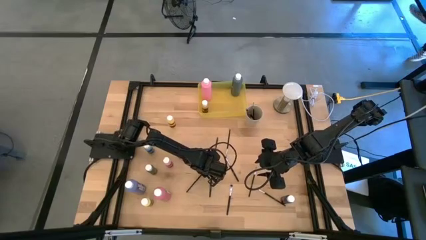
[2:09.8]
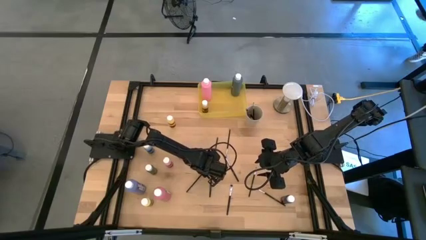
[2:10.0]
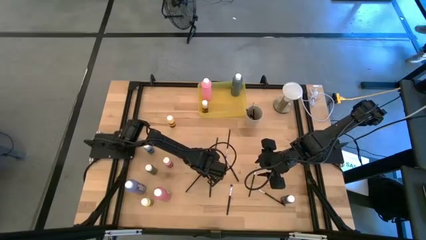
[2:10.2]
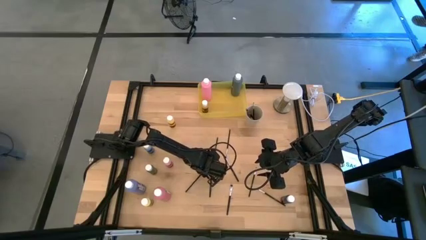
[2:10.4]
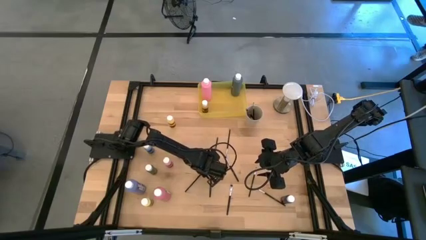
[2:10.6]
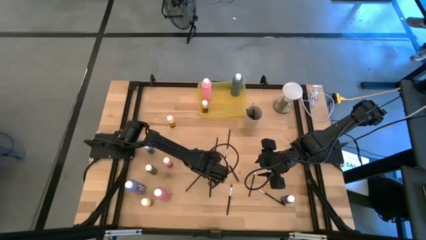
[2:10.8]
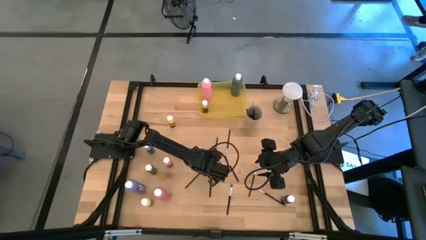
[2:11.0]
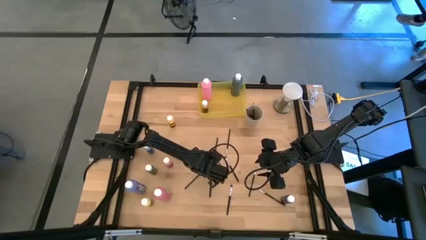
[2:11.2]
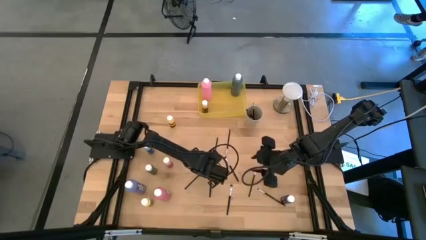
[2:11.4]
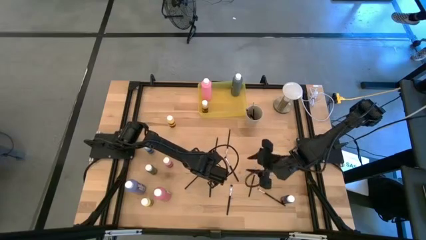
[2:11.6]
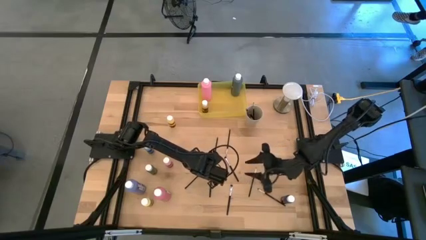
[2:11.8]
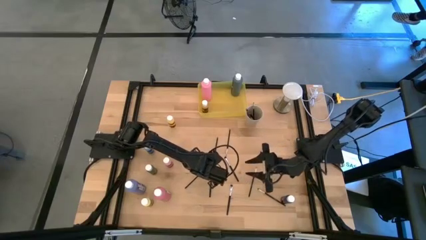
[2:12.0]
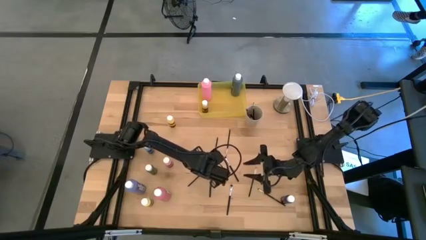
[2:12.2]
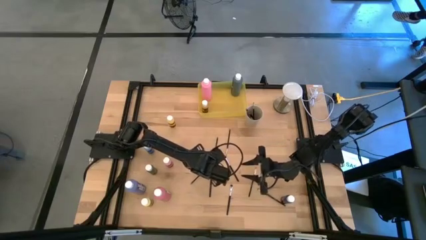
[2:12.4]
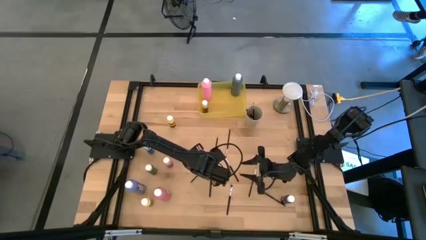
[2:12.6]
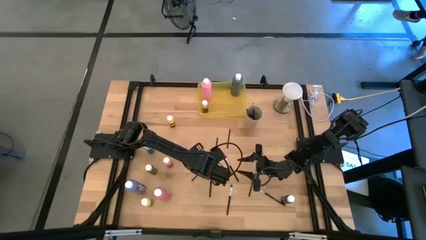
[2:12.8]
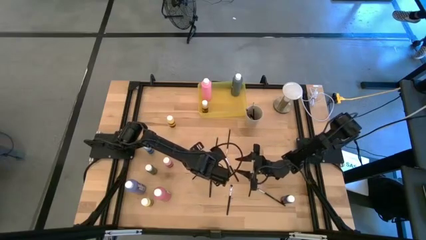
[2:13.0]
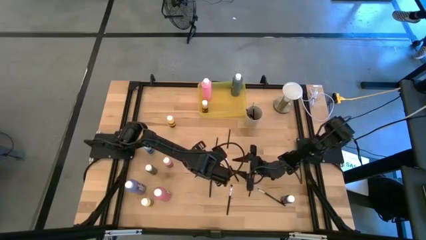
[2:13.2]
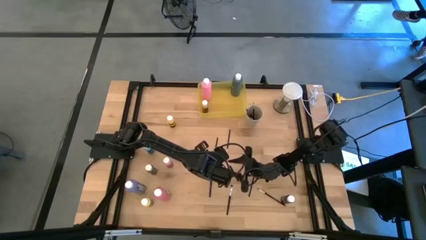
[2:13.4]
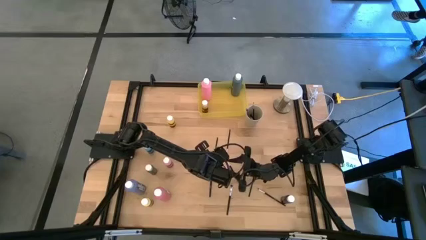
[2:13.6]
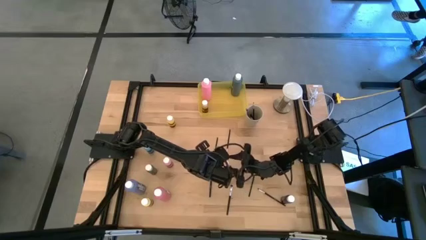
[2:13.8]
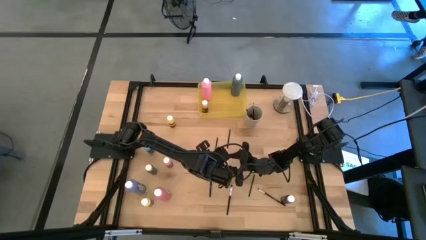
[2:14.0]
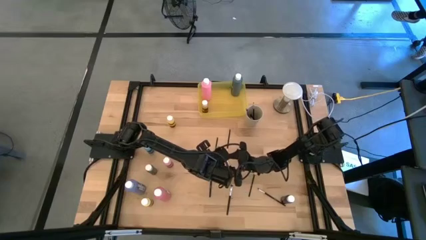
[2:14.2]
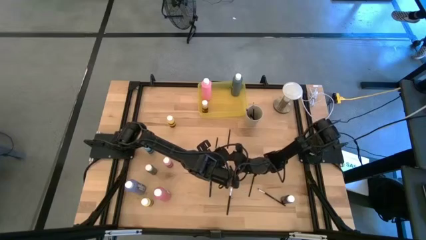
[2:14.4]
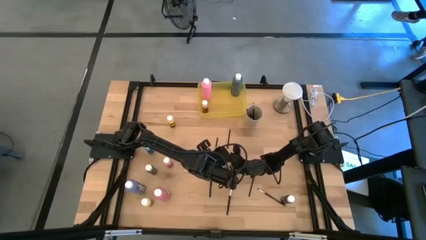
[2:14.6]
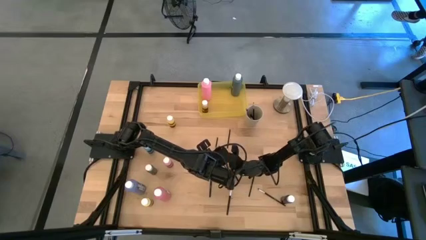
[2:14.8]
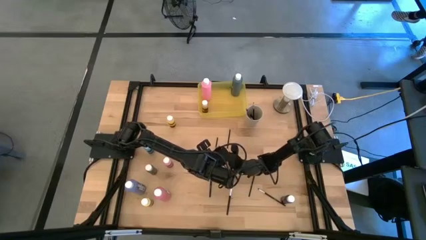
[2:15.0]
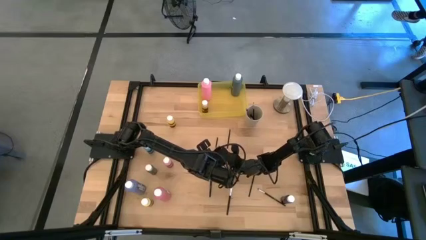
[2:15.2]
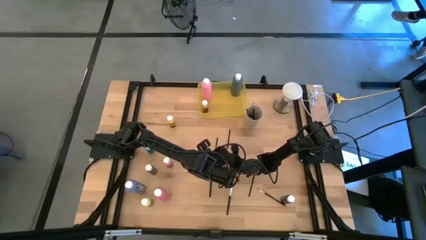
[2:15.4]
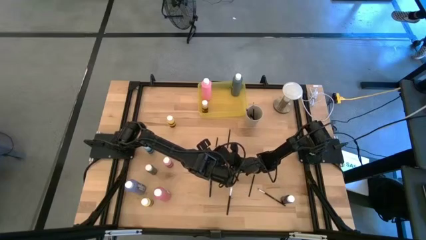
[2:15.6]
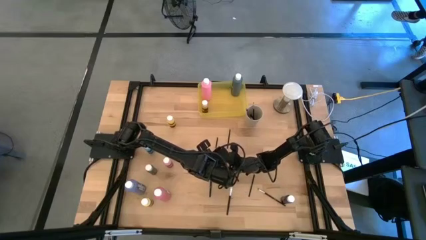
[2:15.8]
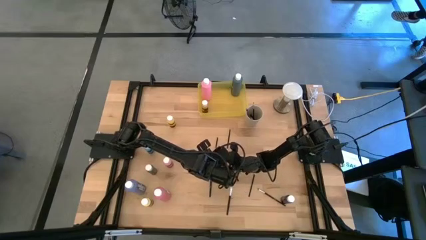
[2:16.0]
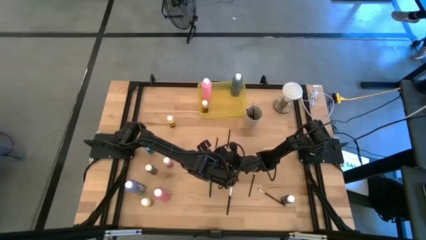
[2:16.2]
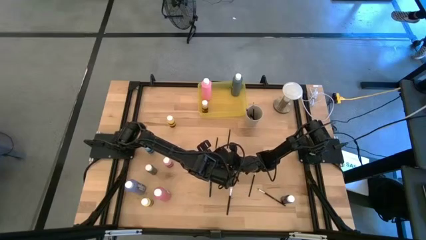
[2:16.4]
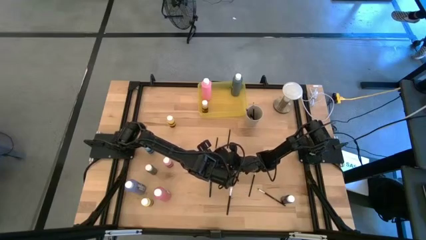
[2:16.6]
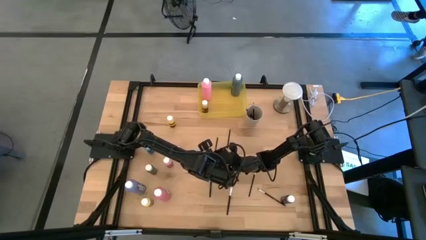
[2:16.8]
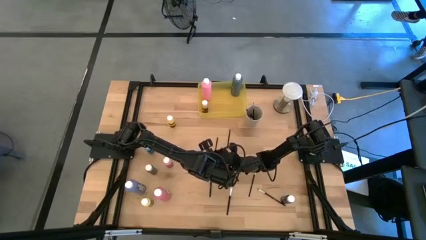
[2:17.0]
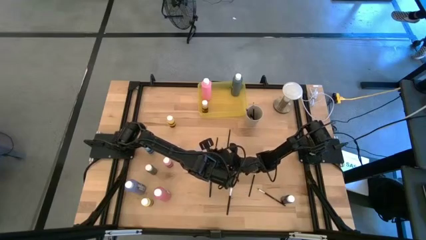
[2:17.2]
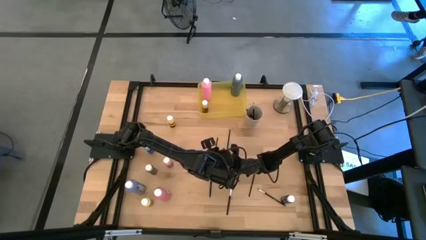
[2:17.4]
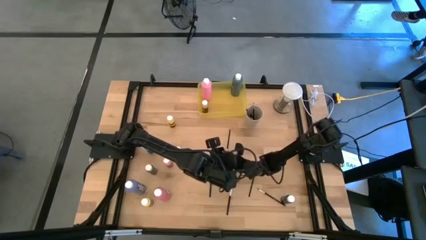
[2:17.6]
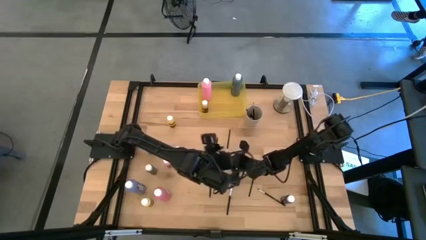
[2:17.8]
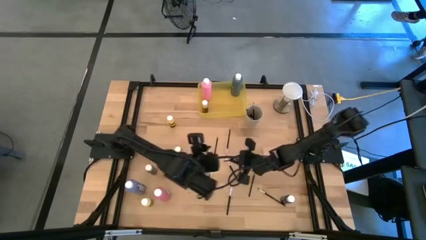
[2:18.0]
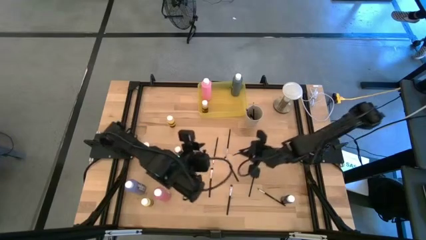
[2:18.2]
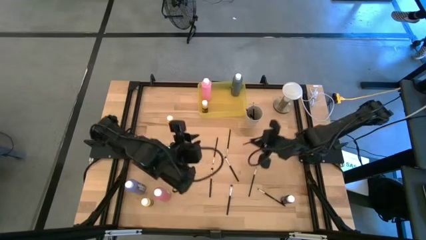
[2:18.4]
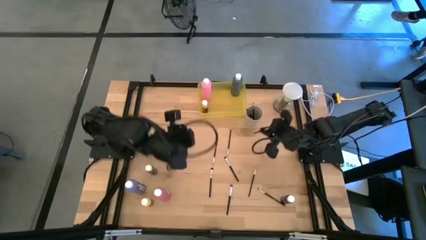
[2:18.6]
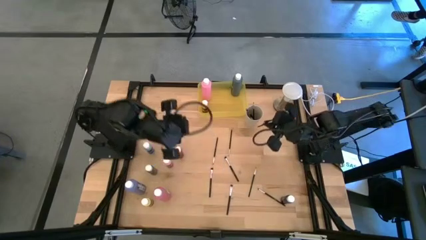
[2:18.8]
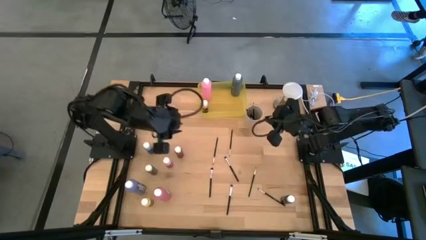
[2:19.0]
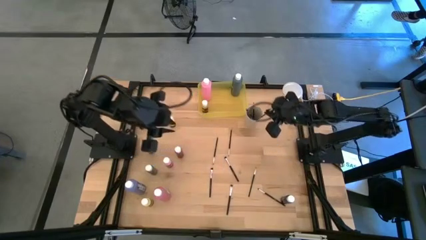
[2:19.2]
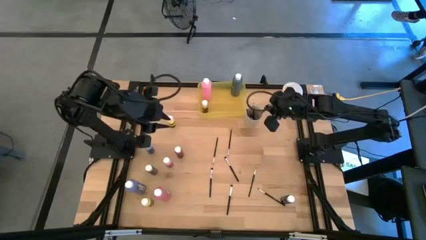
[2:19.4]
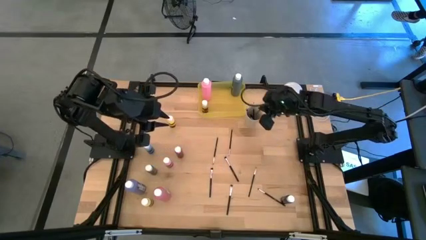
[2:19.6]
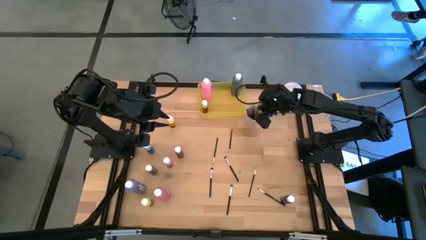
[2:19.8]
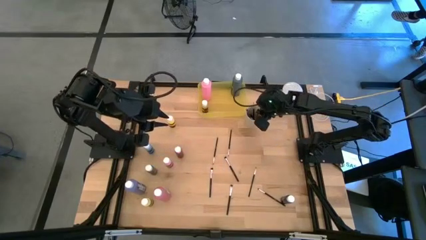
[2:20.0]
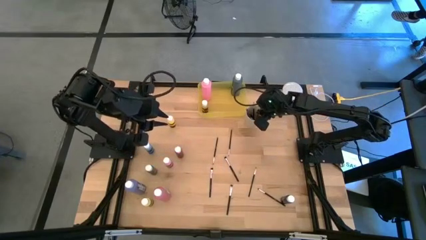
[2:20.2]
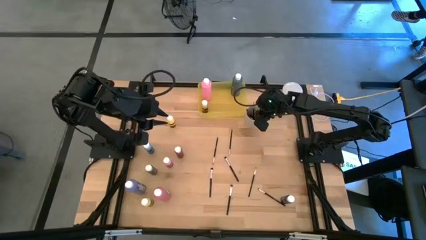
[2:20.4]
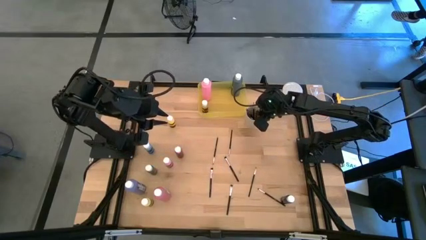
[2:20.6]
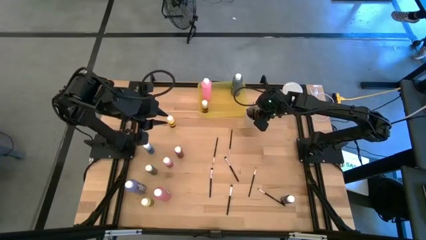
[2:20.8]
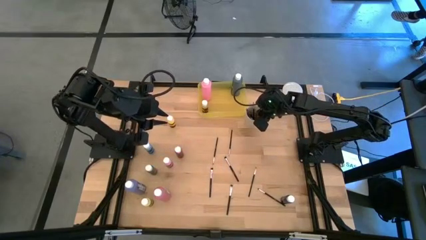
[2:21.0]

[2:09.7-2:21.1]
Task: Pick & Place Paint Supplies
Put the silver paint brush into the white cup

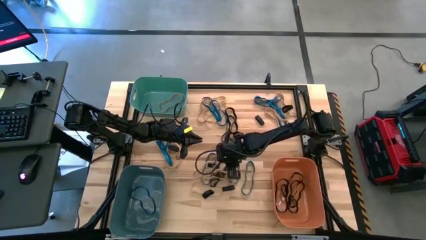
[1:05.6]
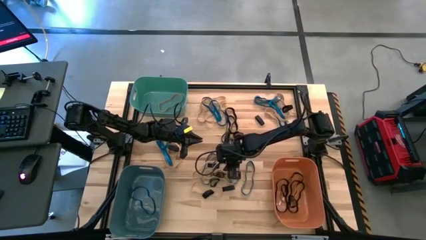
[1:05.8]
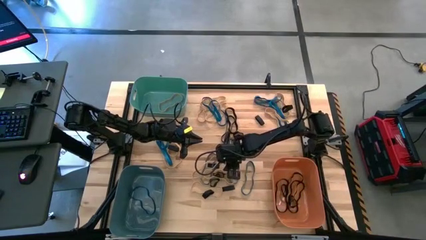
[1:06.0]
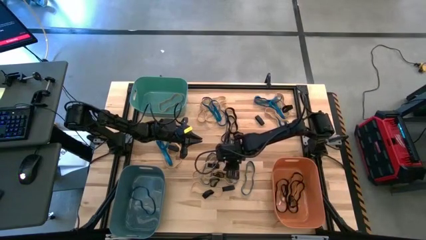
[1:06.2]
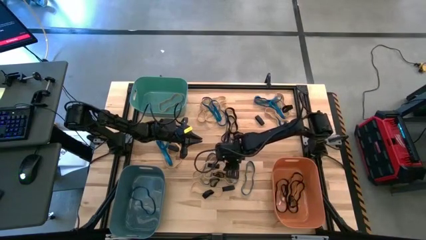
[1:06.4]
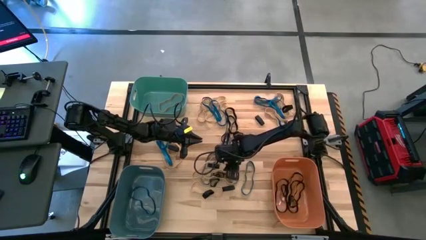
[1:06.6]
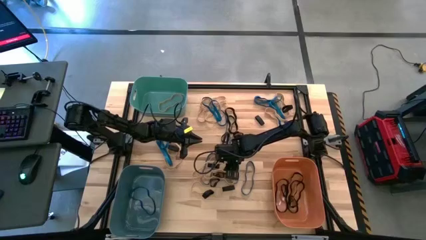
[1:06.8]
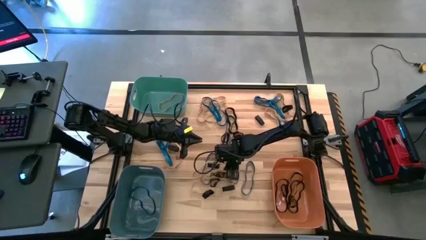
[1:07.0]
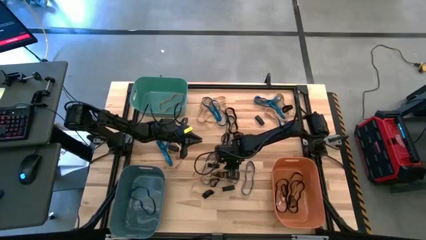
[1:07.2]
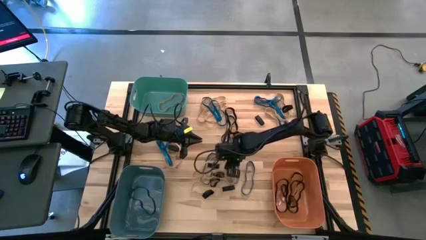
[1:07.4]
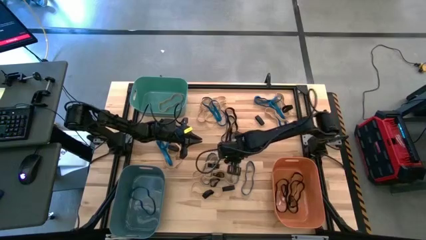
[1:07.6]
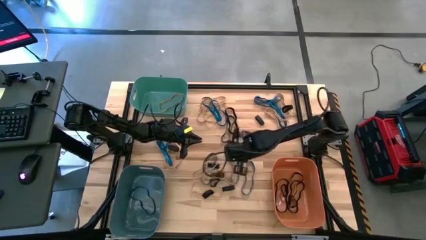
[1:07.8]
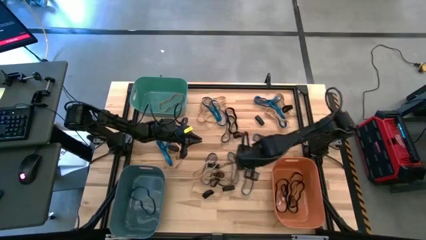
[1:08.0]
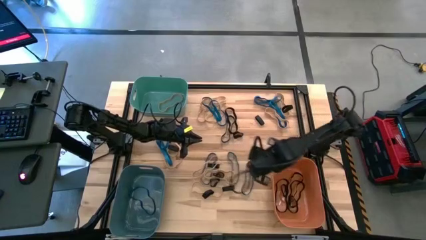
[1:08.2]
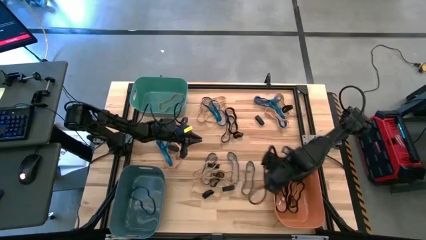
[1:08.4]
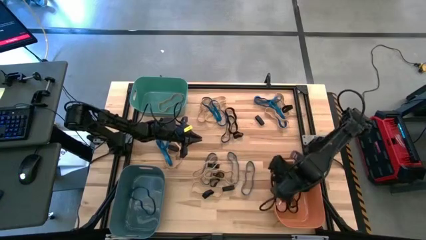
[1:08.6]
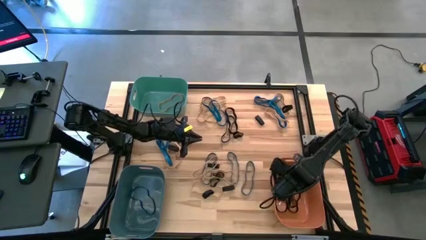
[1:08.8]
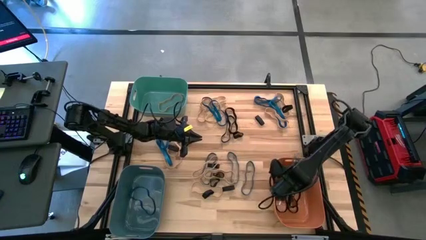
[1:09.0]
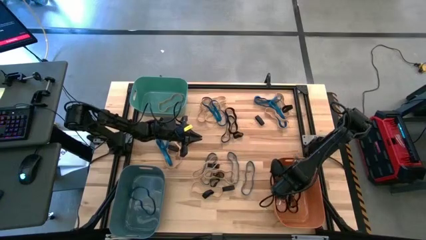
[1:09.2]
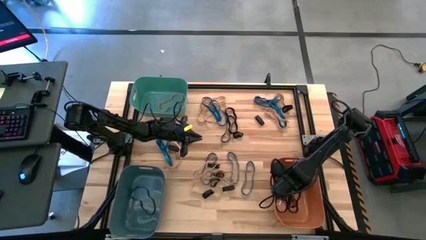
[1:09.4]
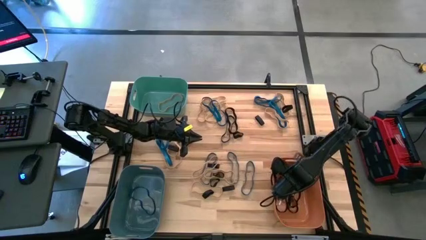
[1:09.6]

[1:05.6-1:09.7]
Task: Sort rubber bands into baskets
Put the black rubber band into the orange bin
